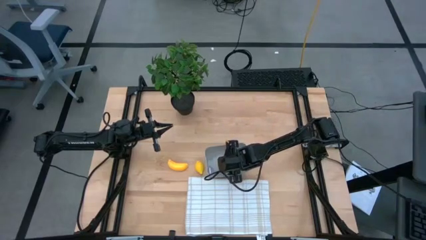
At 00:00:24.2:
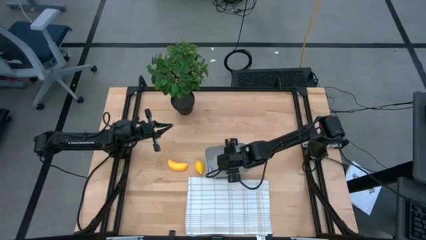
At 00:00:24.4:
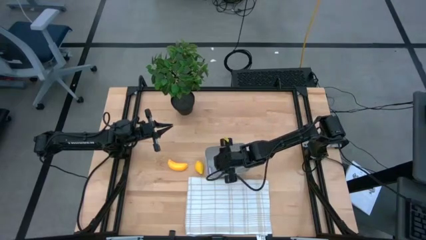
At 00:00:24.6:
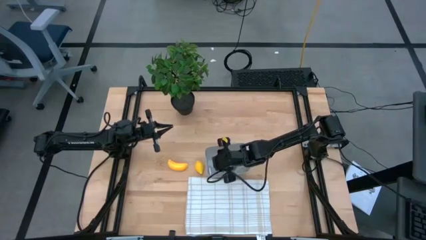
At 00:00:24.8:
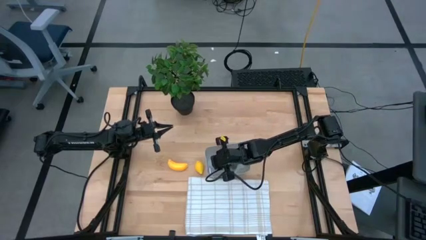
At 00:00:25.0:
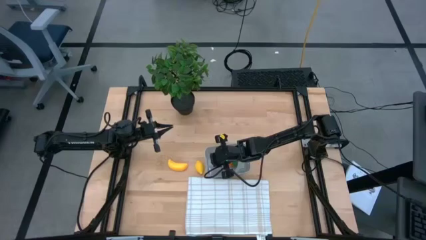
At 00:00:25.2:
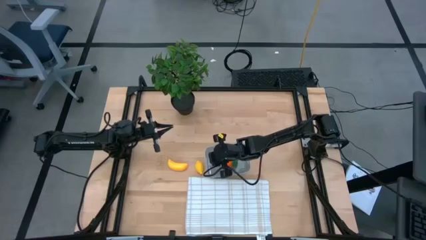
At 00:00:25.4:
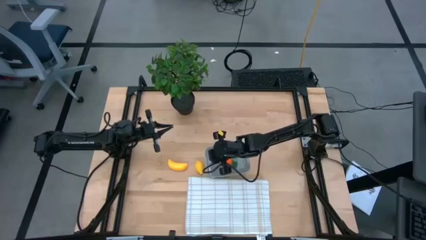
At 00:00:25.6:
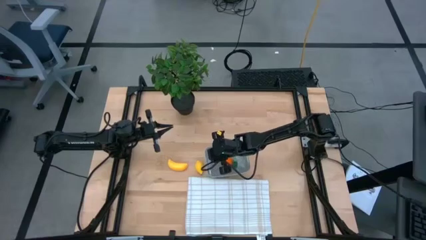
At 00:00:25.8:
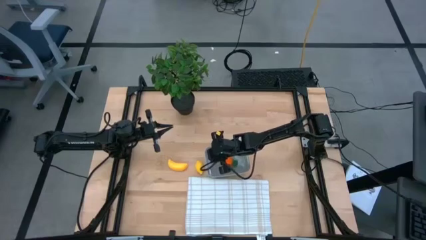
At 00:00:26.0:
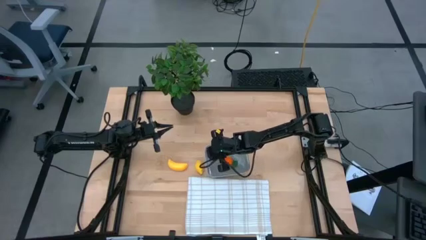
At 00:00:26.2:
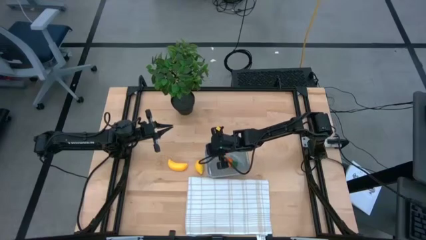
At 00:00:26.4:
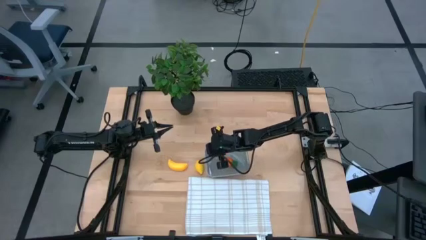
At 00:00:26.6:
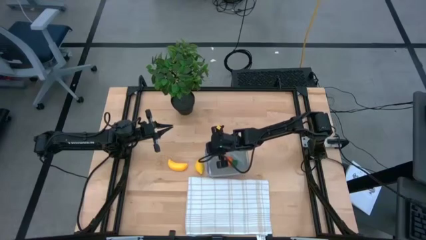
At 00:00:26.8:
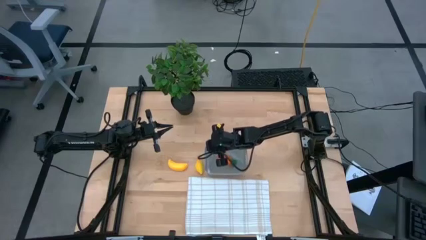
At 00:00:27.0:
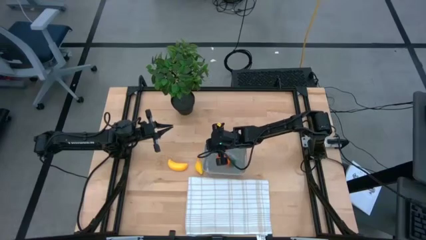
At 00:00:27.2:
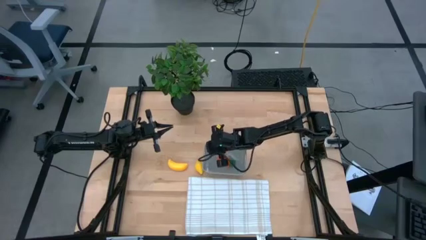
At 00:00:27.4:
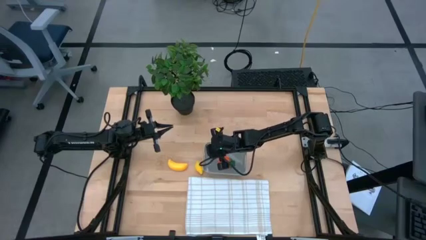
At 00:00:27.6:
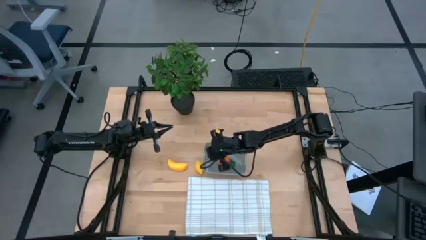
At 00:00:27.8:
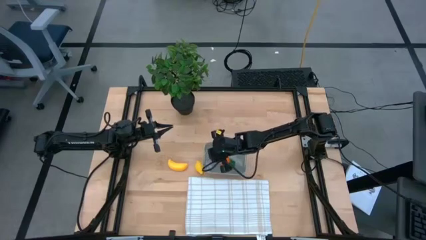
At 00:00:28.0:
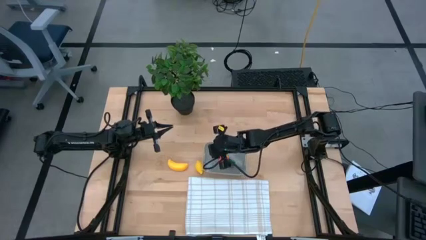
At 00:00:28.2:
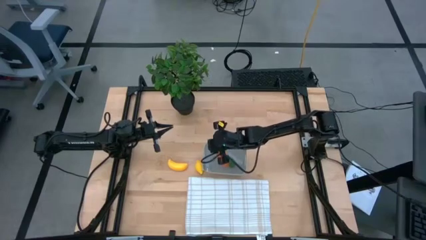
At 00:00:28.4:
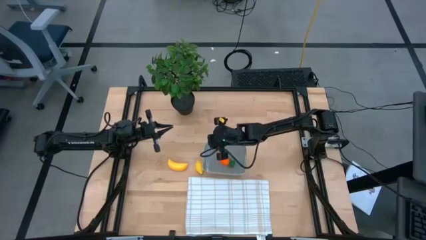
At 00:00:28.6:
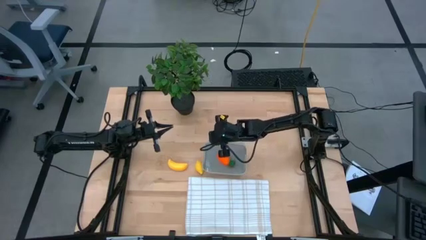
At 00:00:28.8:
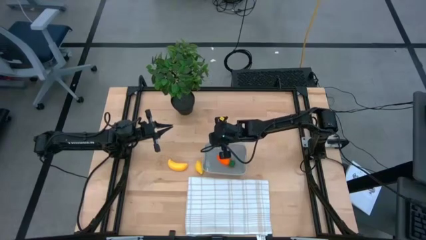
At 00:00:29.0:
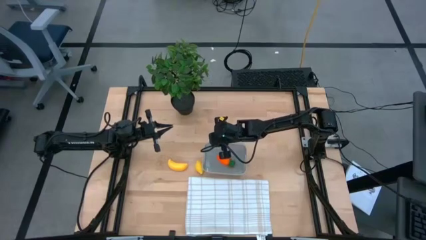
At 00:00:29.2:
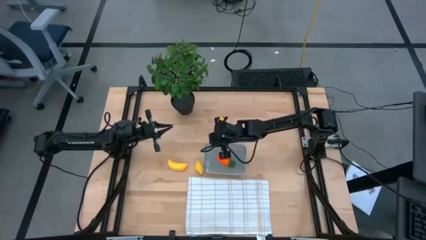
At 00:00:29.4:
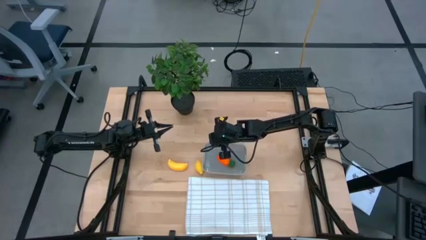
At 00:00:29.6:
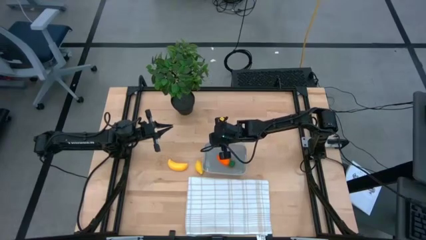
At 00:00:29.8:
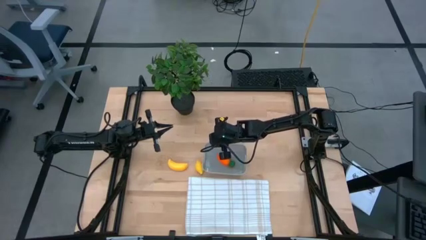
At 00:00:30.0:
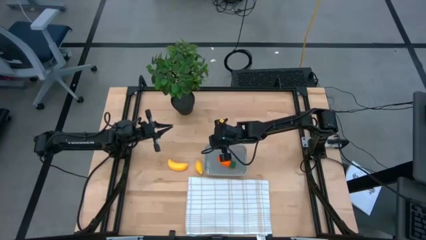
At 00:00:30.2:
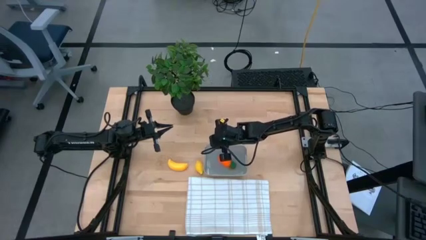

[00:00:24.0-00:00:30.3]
Task: Pick and placing Produce into tupperware
Adjust the gray bin
